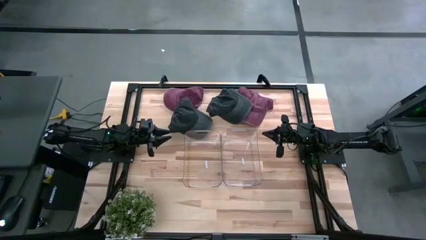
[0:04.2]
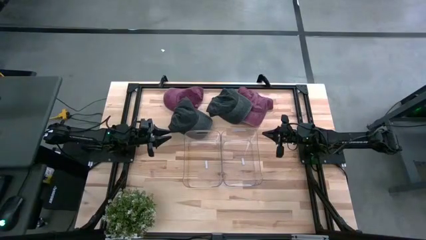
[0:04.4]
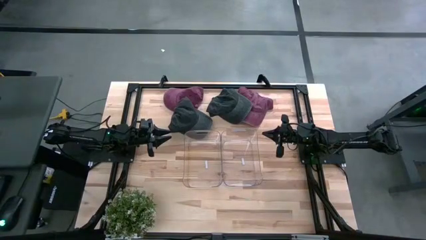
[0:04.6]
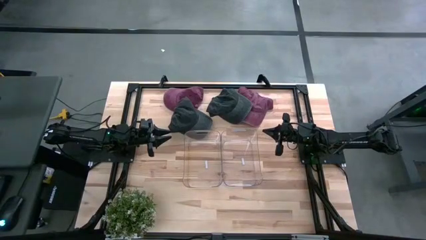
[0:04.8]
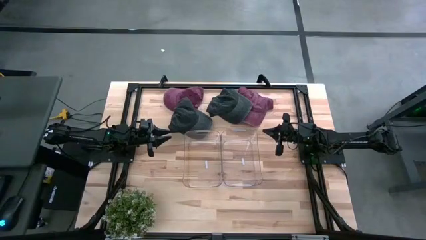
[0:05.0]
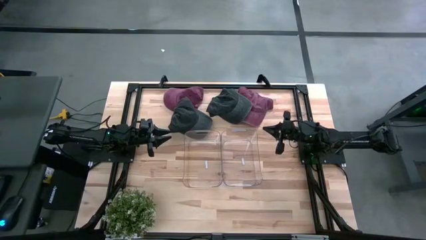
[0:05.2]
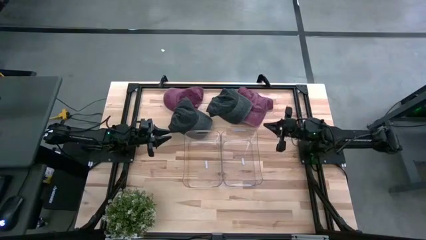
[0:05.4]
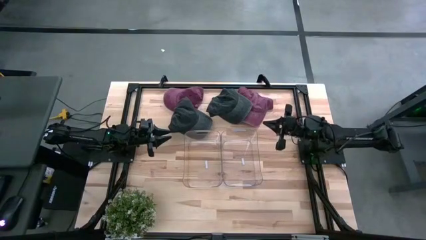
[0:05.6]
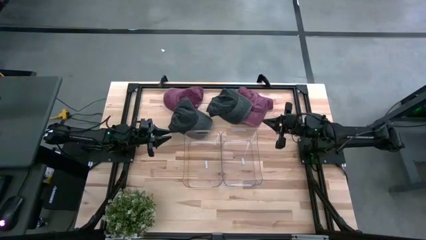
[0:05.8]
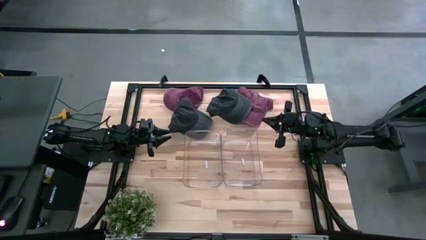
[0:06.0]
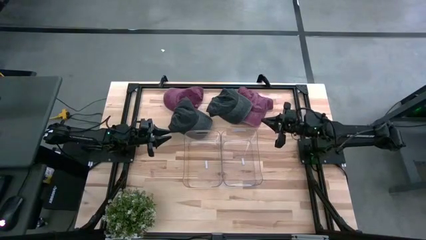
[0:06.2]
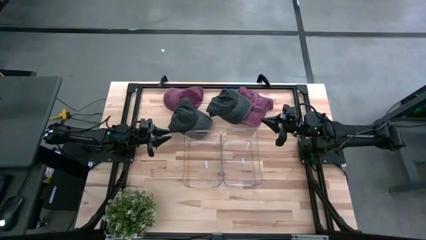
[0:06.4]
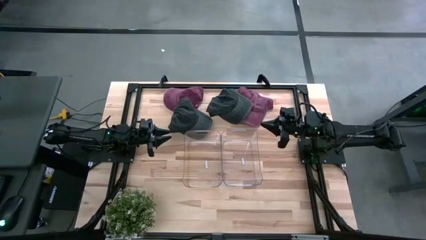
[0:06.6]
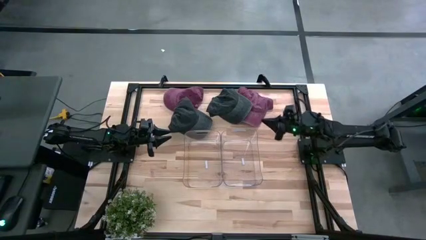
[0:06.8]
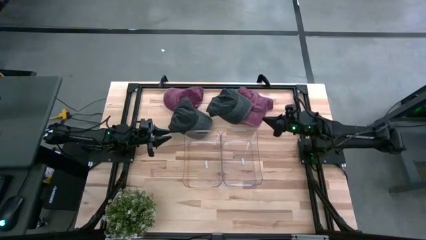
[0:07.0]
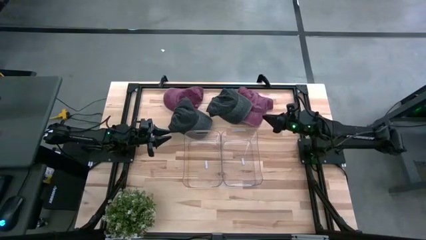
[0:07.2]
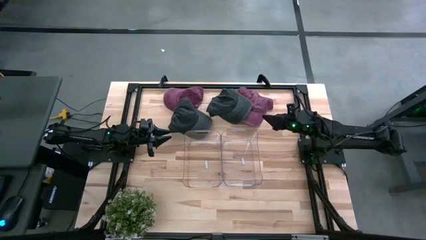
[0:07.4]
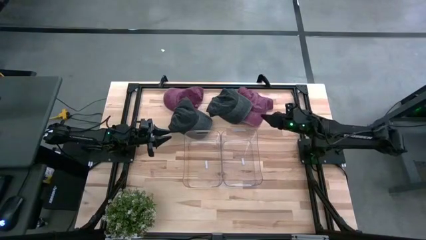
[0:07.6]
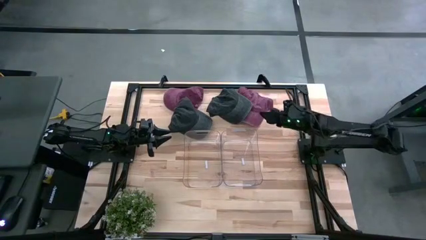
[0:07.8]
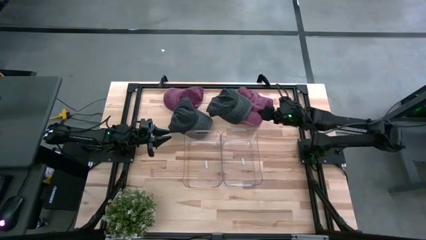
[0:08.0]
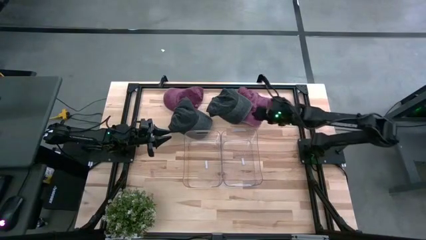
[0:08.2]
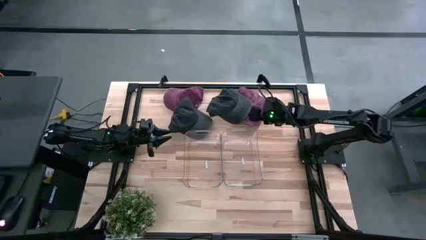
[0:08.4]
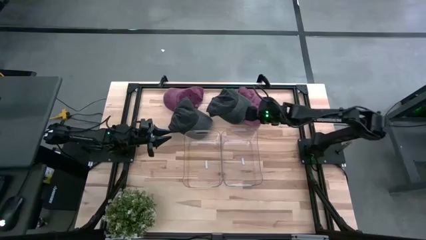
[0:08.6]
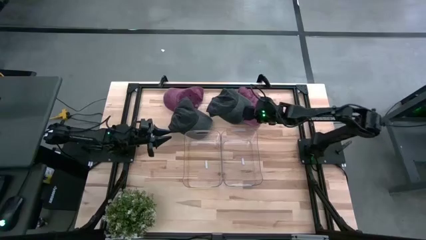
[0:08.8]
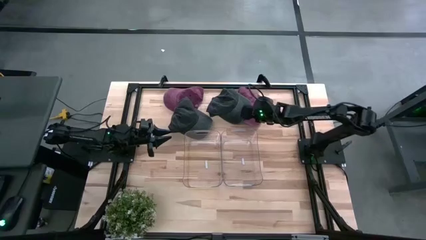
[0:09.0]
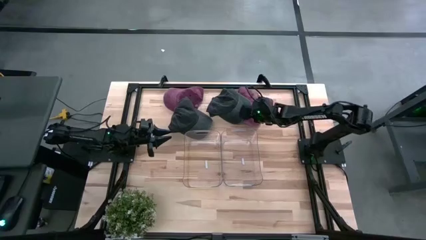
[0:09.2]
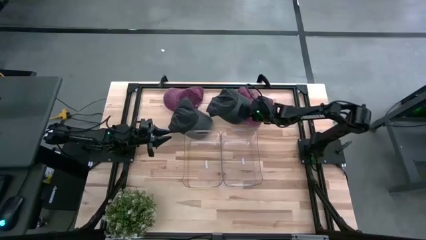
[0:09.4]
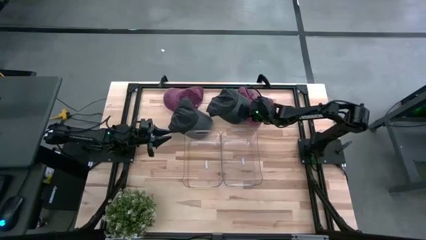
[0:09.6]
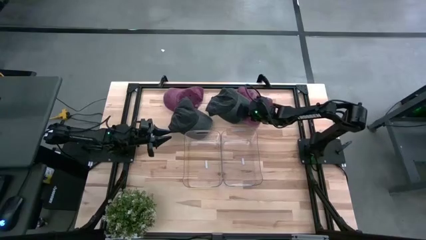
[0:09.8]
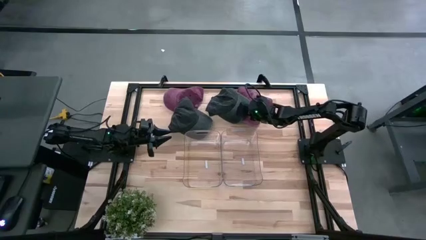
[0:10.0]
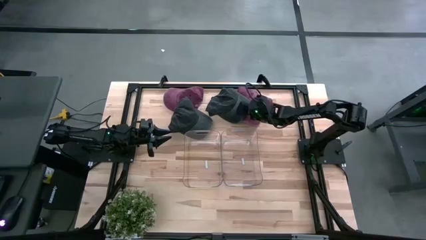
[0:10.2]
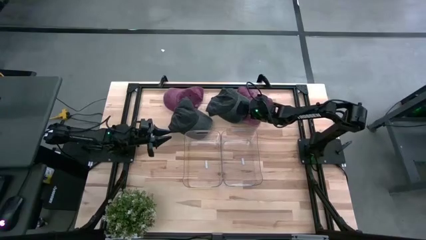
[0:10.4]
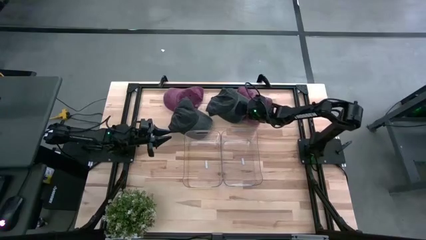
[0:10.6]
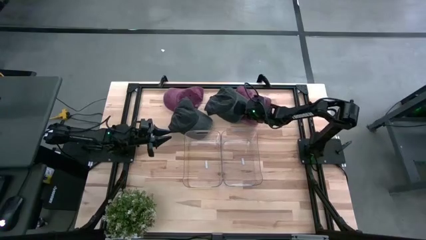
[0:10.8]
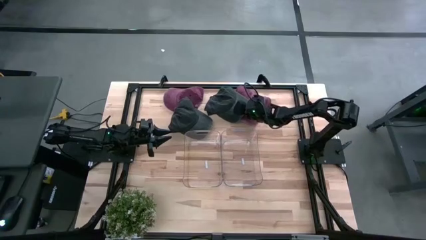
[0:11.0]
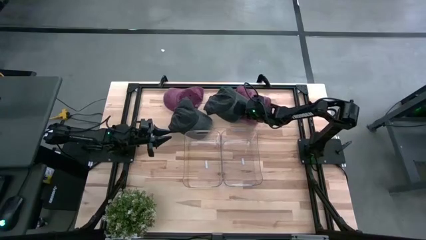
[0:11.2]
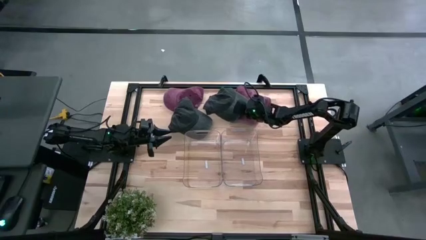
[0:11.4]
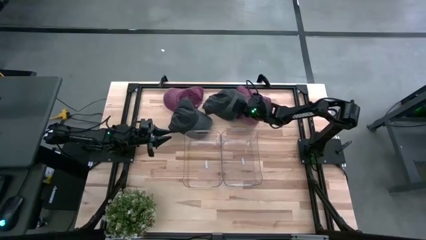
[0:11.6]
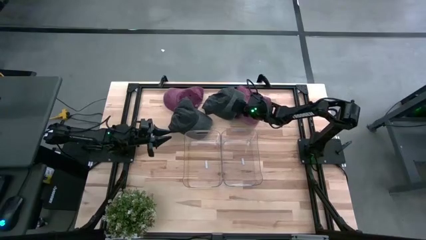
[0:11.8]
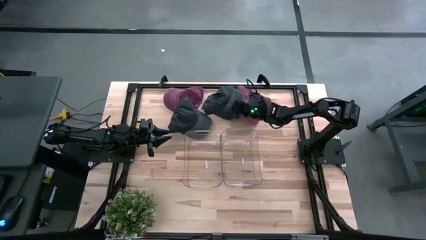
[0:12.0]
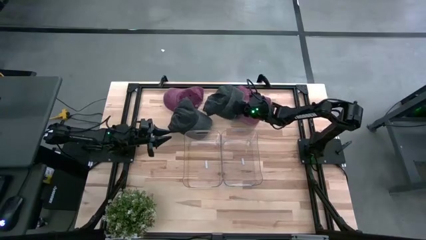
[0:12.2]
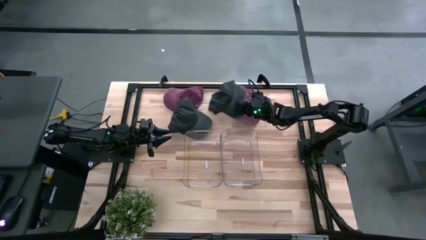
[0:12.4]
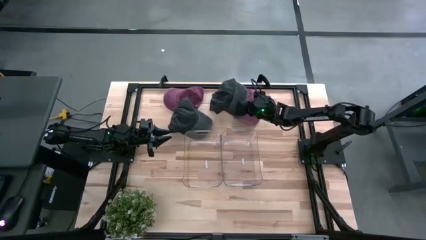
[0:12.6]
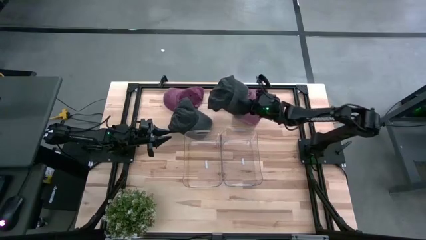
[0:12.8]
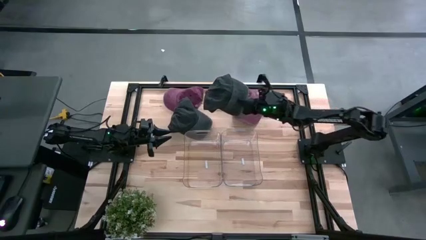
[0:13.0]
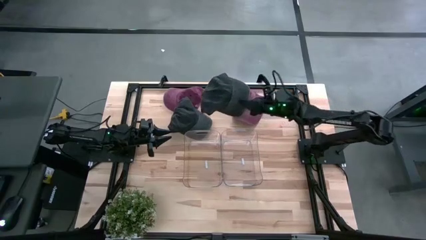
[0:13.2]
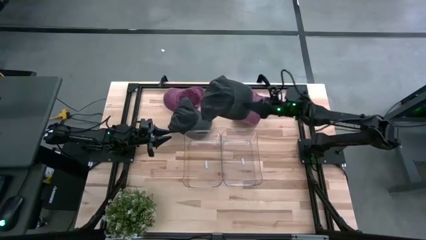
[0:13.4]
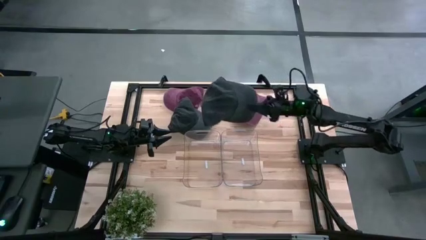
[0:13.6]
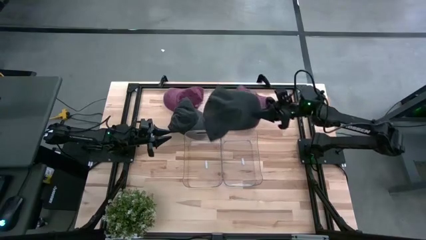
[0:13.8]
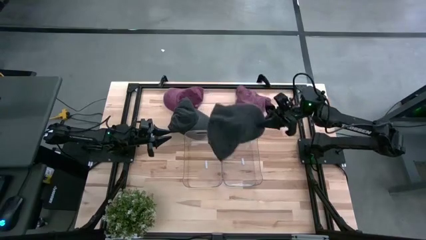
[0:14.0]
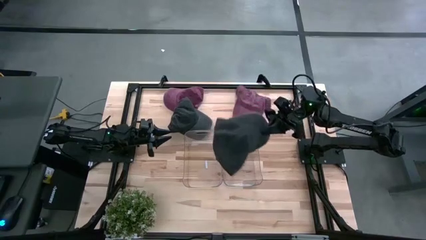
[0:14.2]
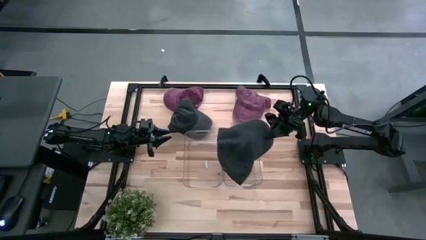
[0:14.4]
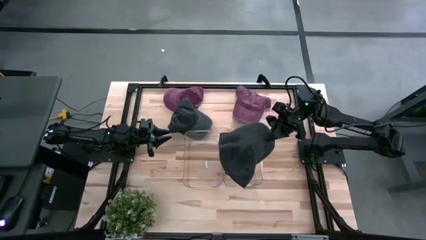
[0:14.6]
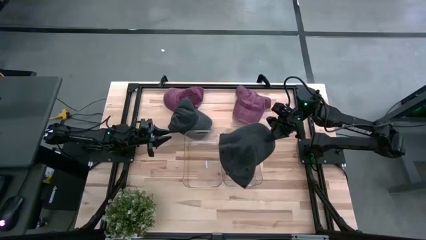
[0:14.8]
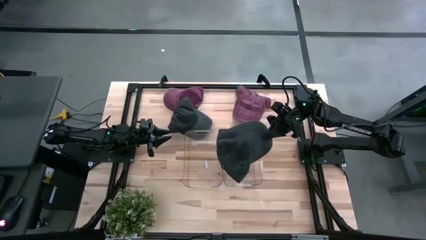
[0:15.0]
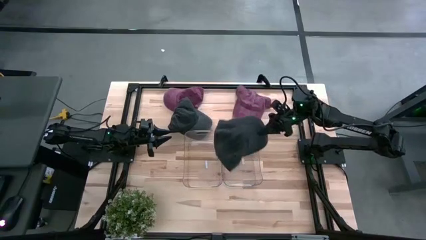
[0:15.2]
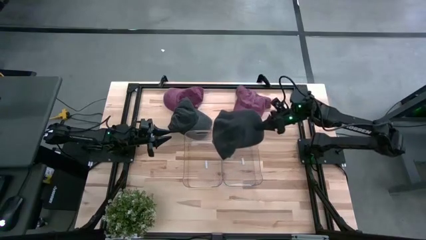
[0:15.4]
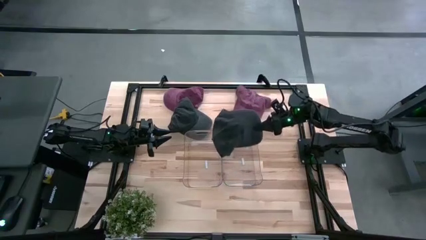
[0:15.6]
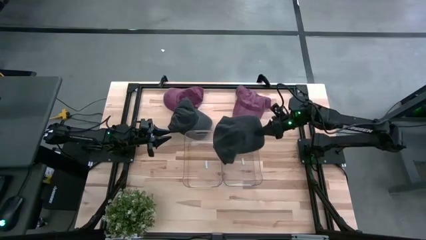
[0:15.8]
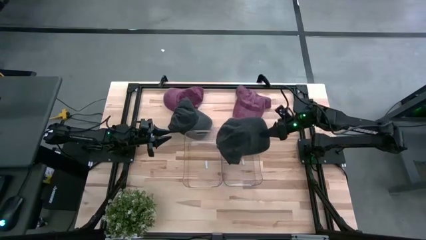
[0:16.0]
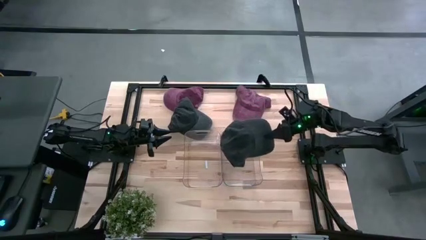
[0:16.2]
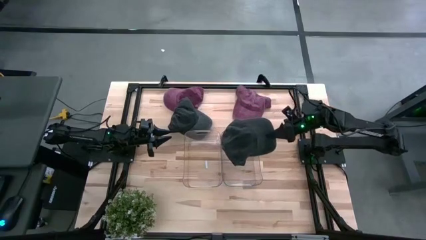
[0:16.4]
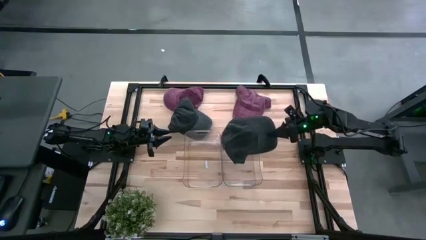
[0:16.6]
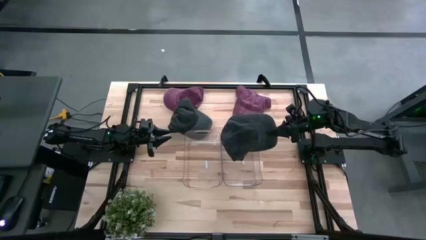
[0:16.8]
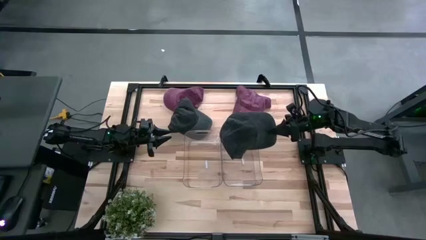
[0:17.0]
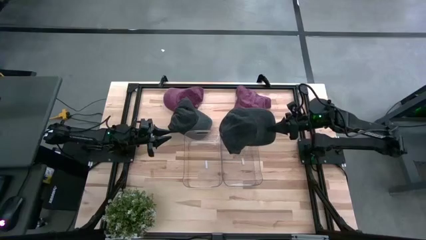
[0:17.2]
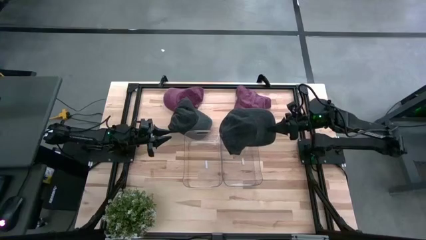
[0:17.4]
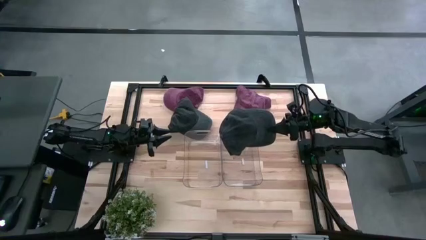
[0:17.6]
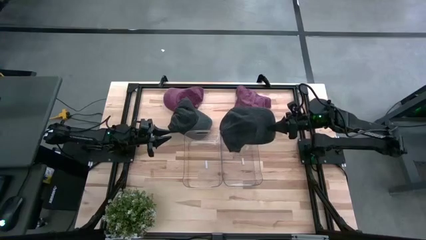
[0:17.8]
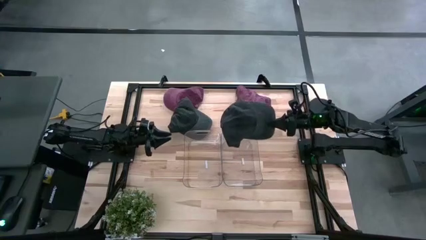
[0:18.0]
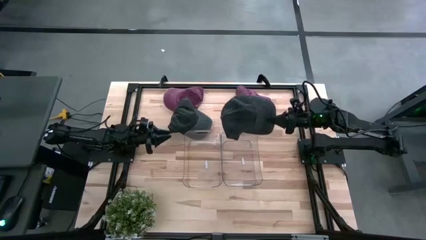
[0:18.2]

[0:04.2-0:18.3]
Task: Pick & Place hat
Put the right black cap into the left transparent bin
